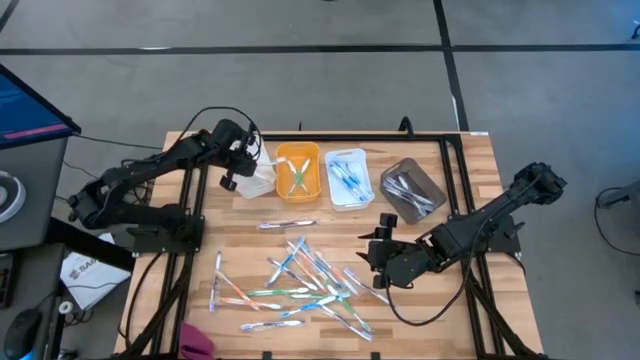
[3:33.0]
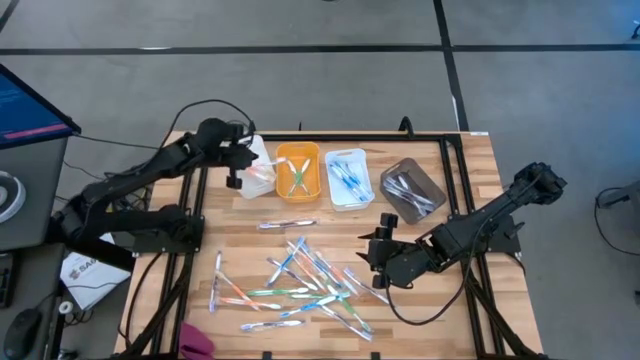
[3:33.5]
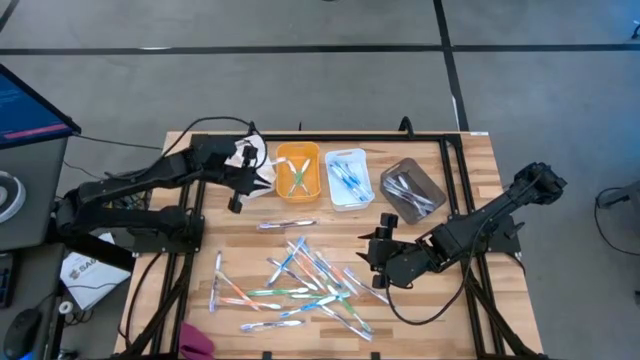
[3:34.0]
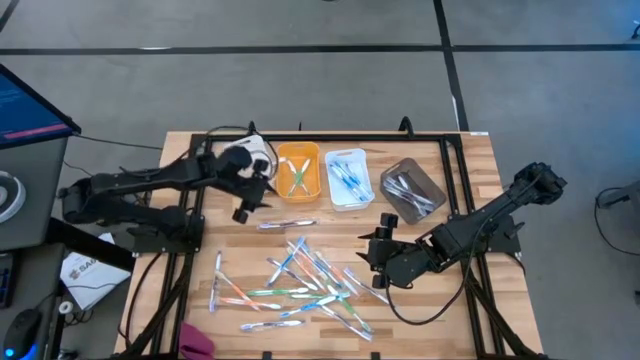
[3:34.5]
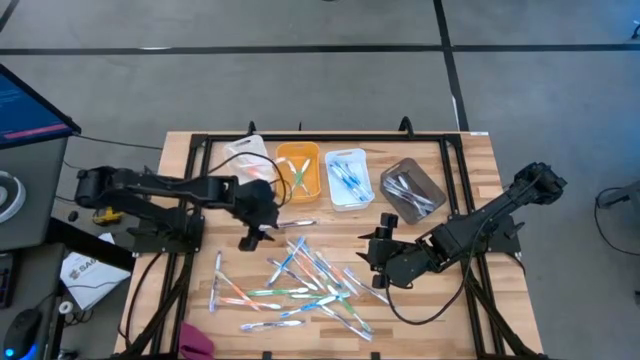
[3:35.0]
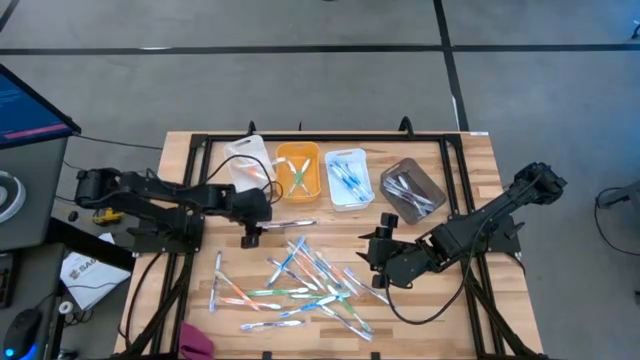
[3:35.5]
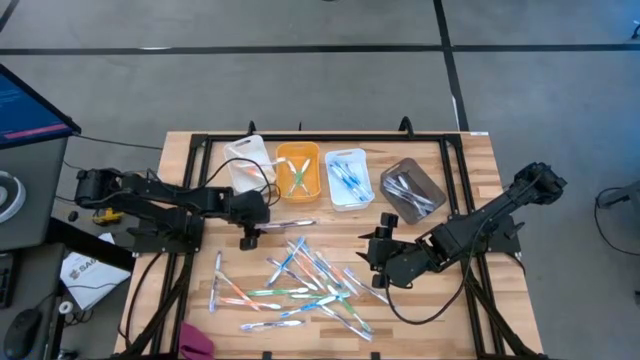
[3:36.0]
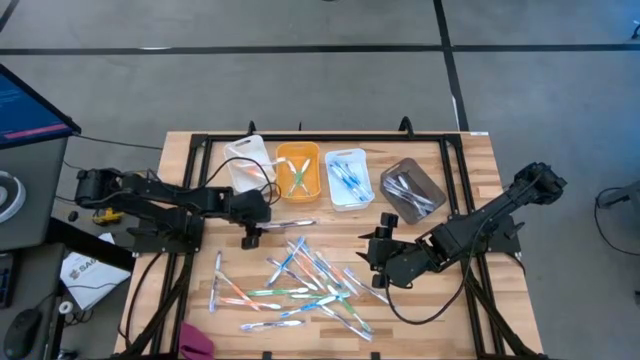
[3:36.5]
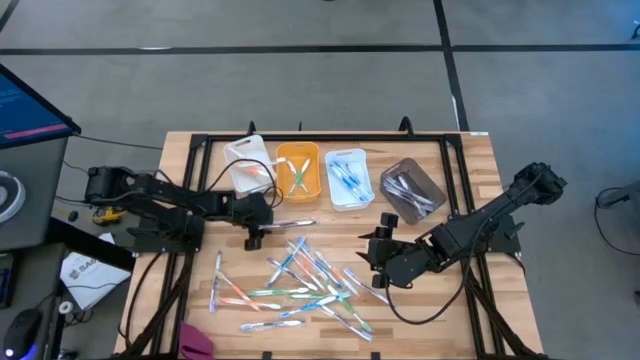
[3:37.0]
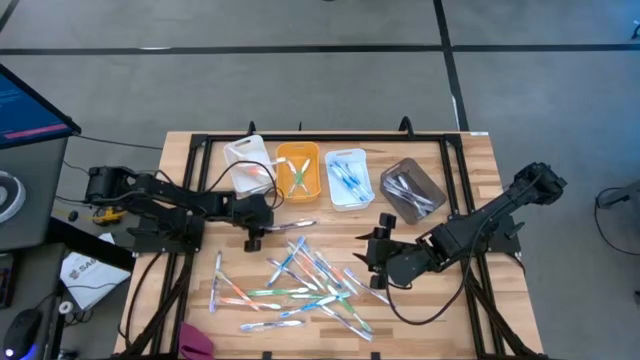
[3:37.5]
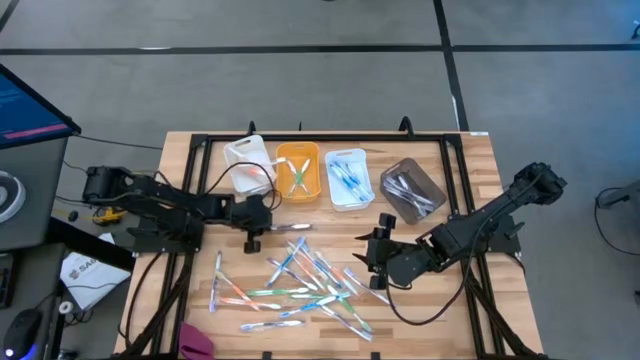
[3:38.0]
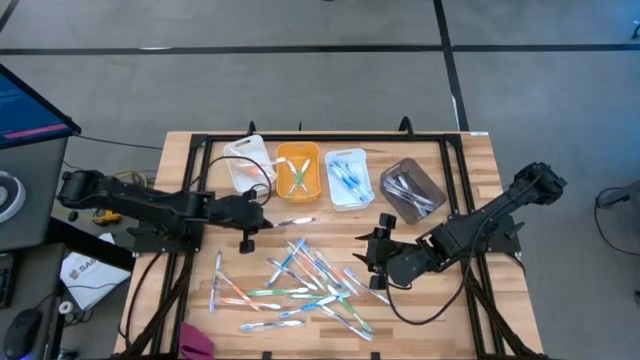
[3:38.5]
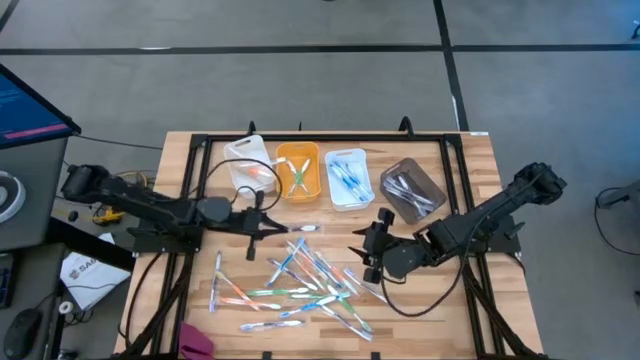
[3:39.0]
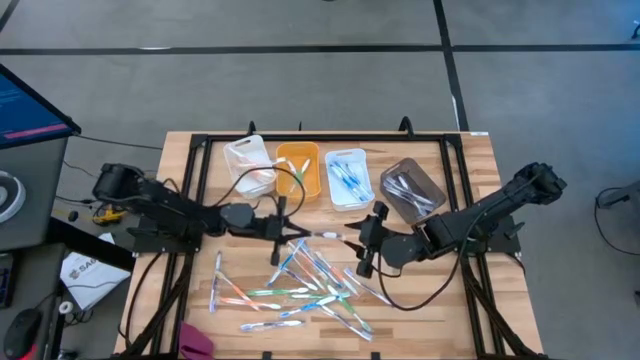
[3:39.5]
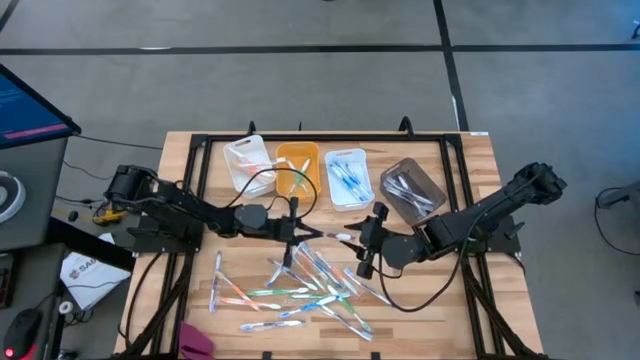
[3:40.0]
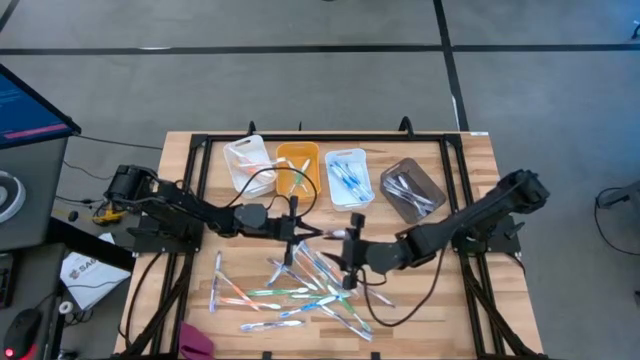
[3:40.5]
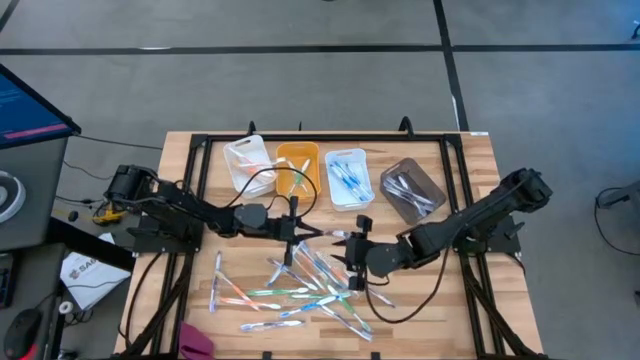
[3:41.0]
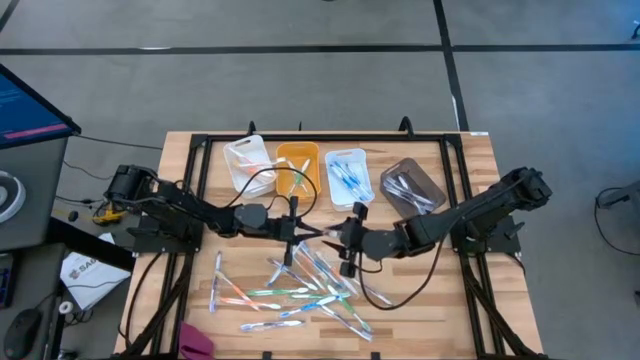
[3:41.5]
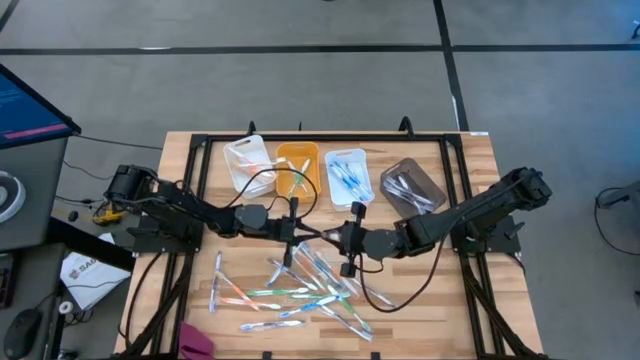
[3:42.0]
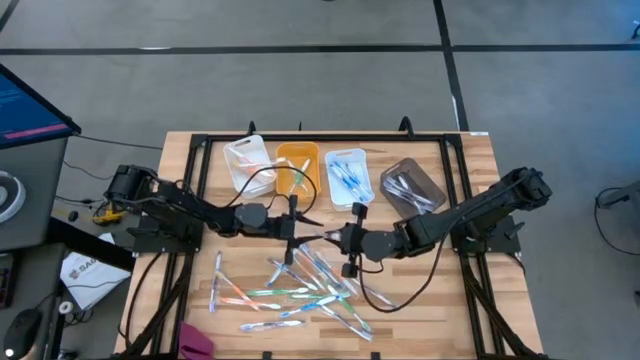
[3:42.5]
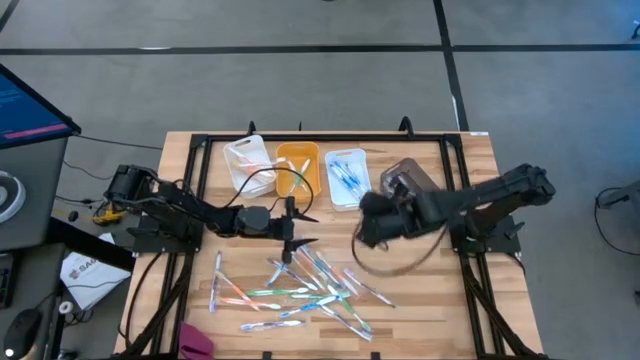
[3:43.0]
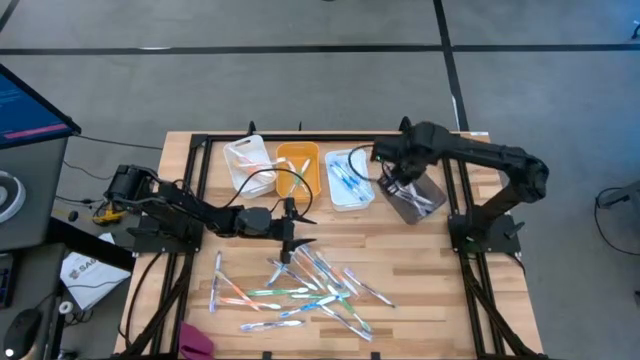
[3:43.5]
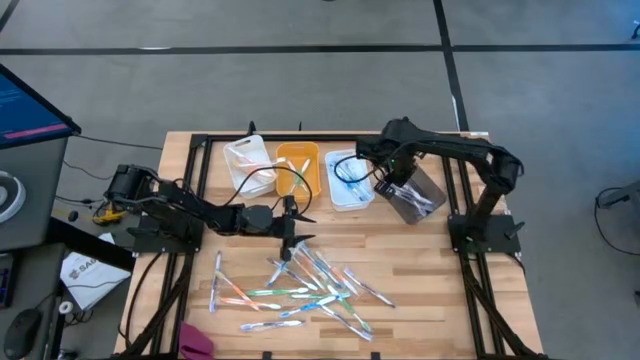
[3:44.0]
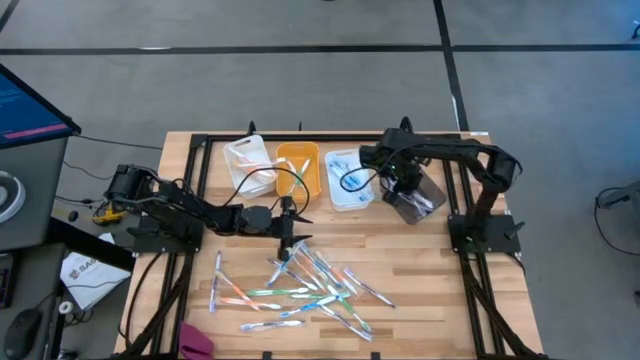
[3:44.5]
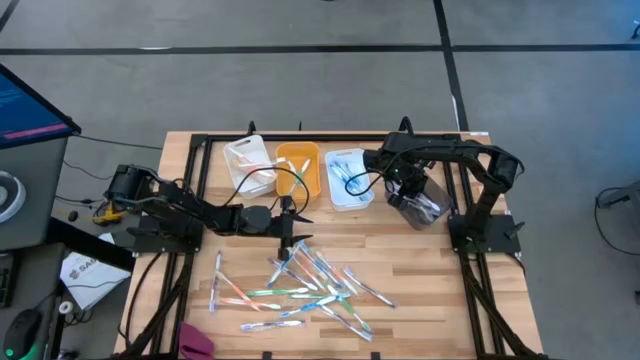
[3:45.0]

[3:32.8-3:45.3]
Task: Pick & Place Toothbrushes
Put the white violet toothbrush into the black transparent bin

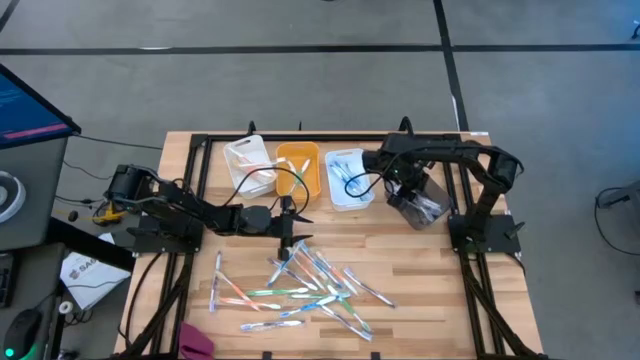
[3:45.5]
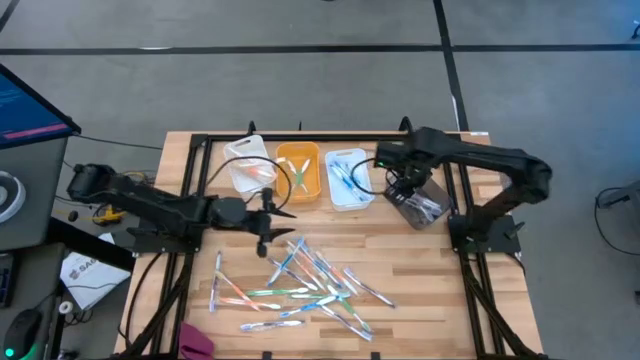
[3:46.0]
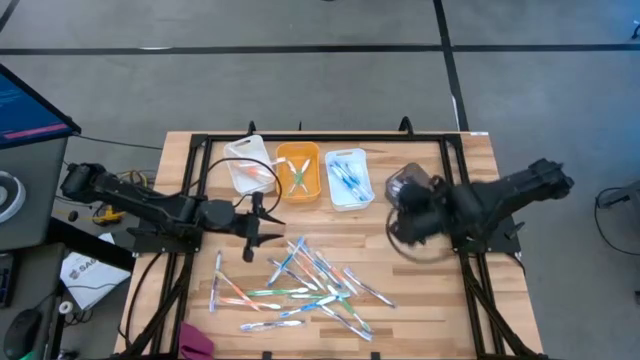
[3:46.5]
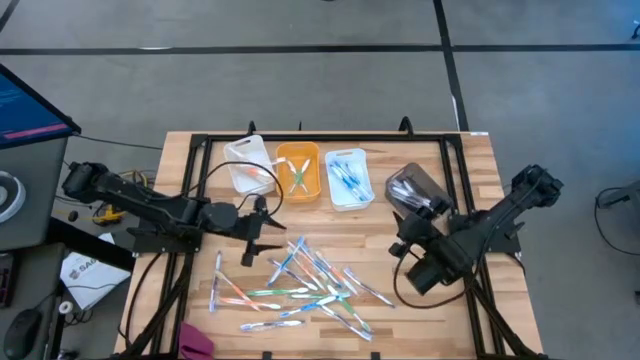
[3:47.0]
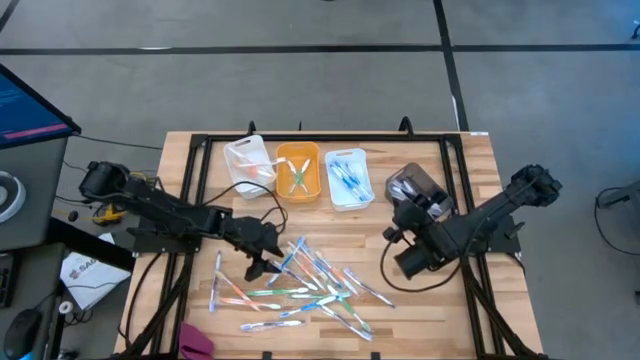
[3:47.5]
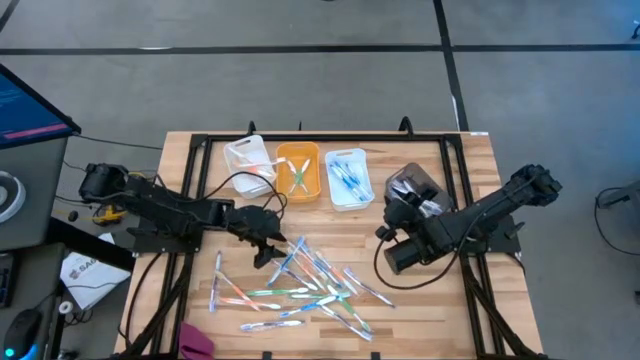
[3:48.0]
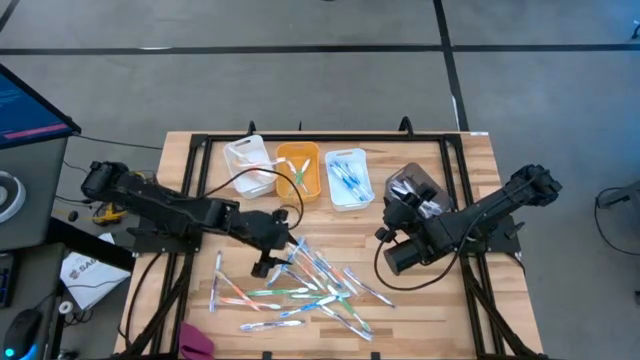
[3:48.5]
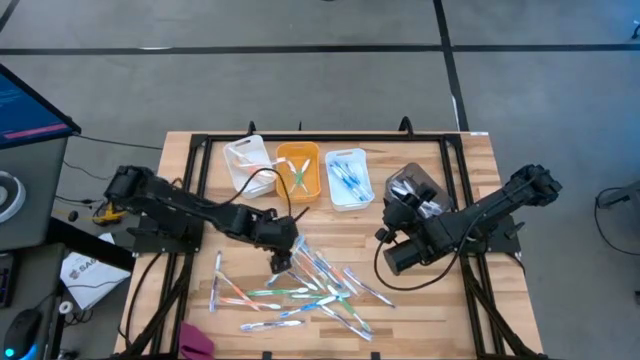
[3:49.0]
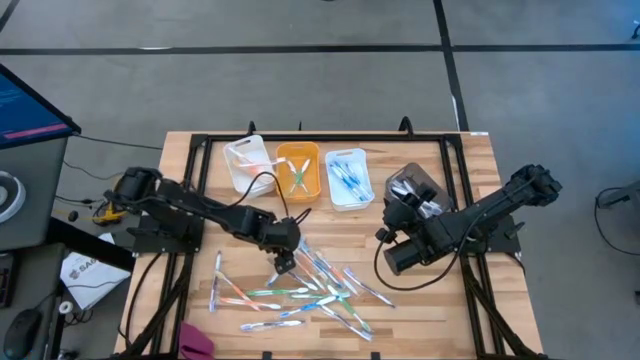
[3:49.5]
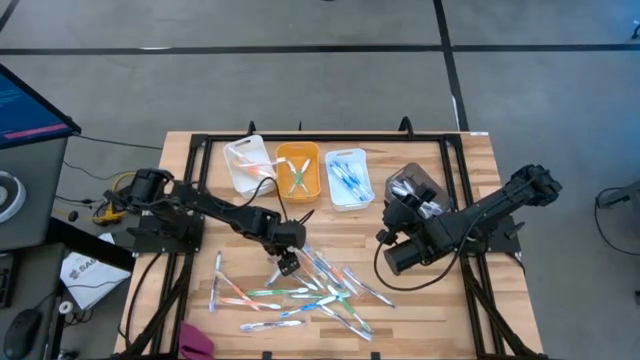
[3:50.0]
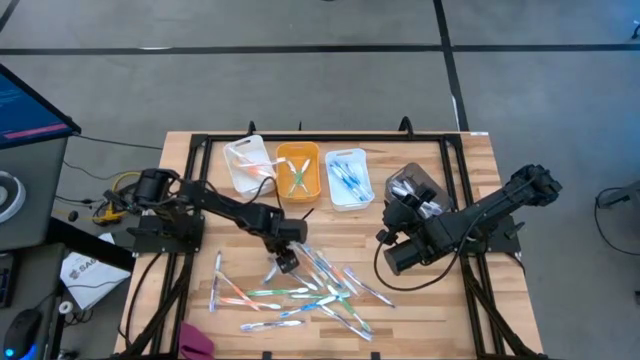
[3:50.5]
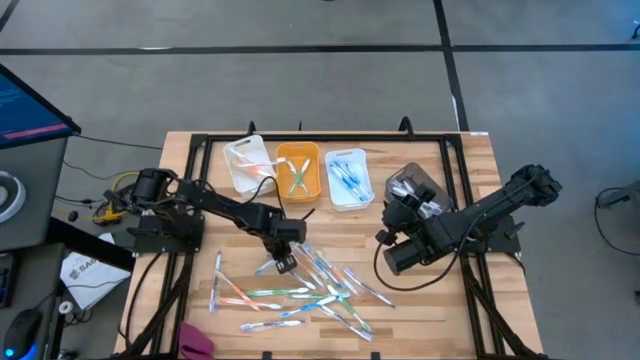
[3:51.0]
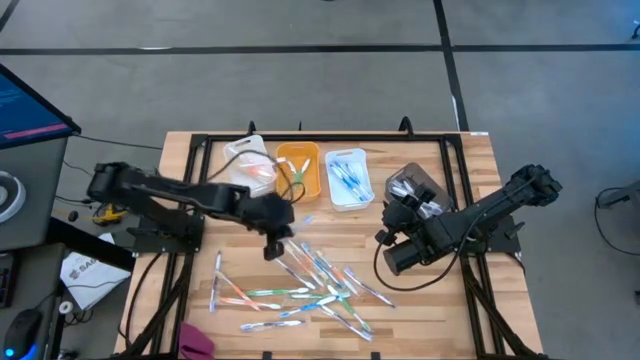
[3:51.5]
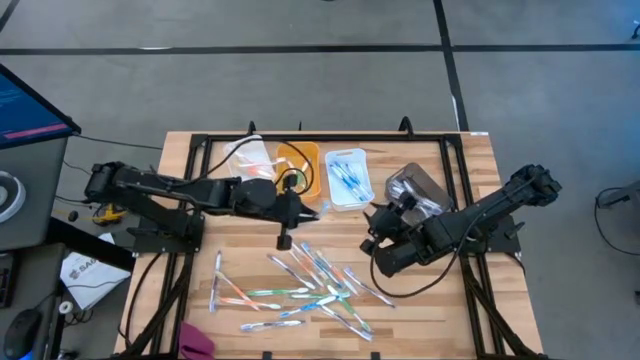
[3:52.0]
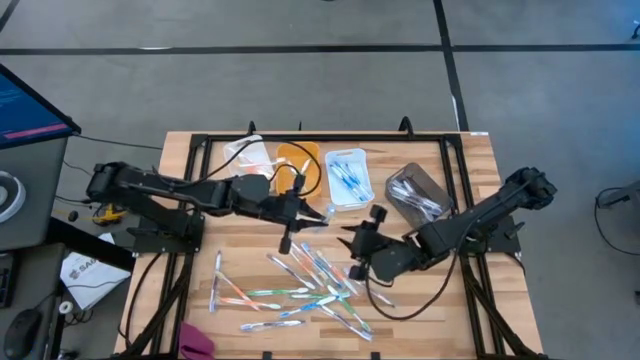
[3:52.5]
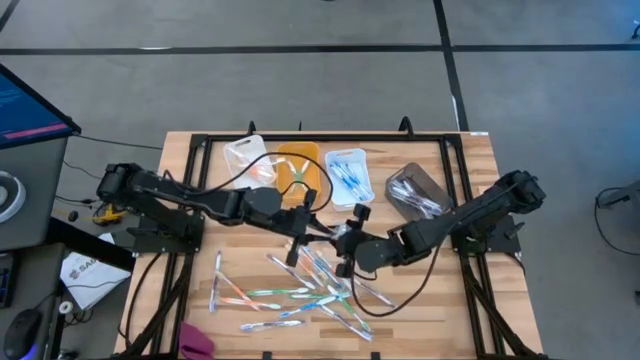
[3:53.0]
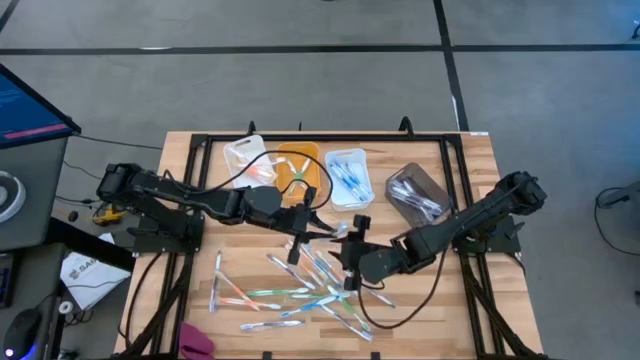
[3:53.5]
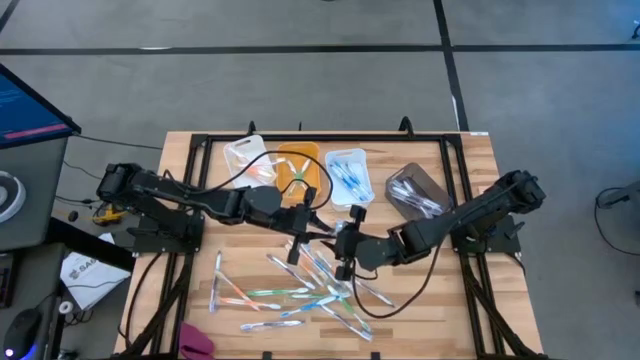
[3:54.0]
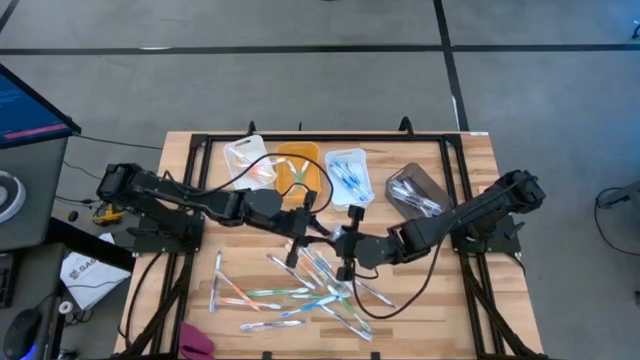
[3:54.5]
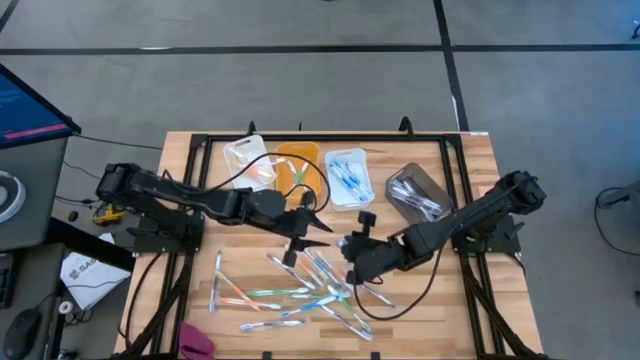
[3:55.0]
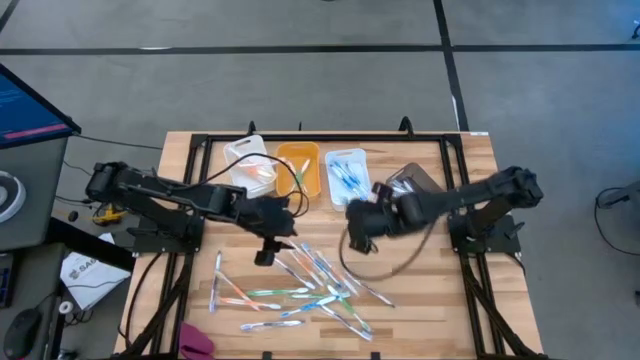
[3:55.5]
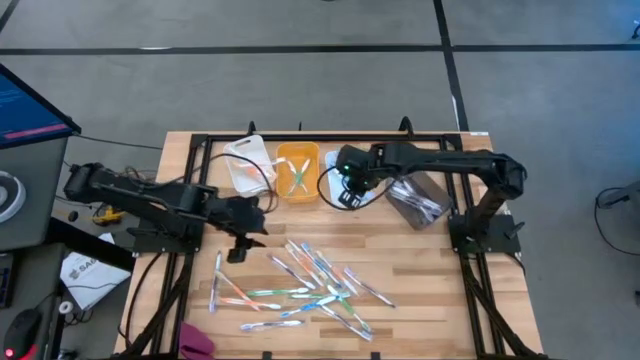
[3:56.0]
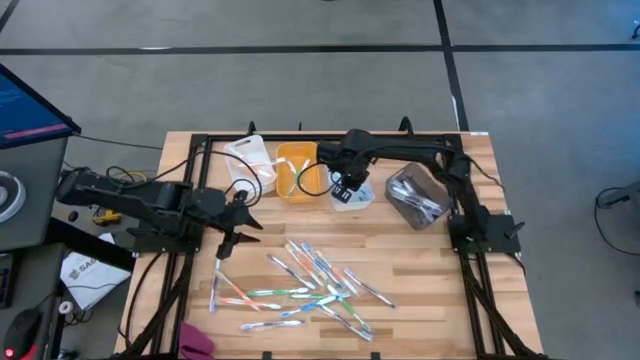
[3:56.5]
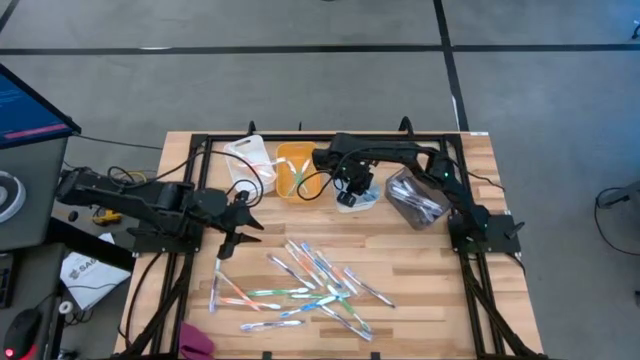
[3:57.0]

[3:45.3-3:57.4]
Put the white blue toothbrush into the right white bin
